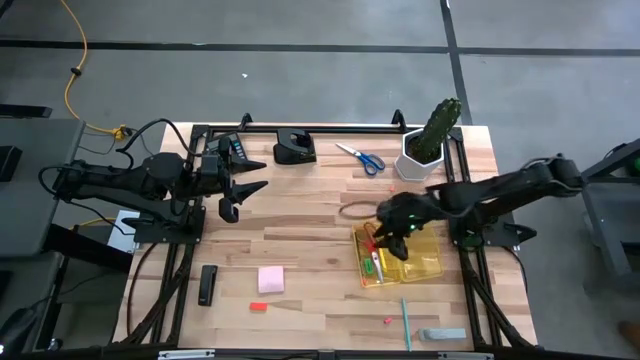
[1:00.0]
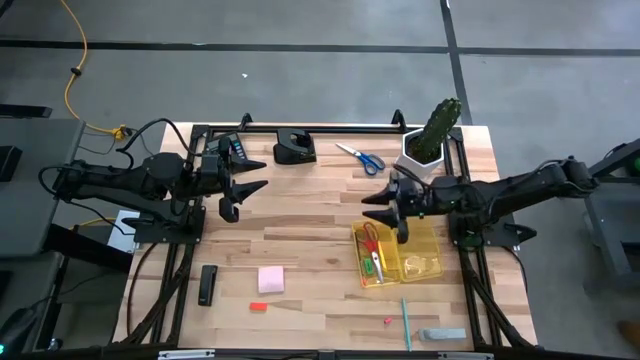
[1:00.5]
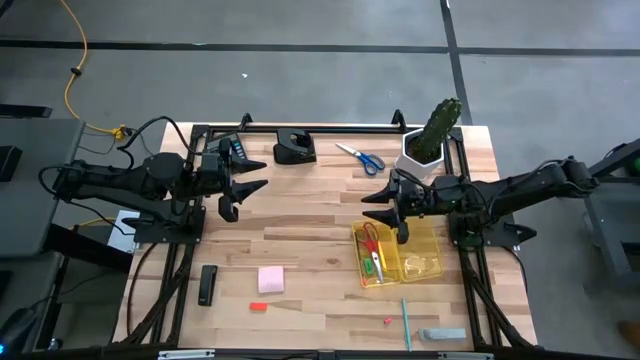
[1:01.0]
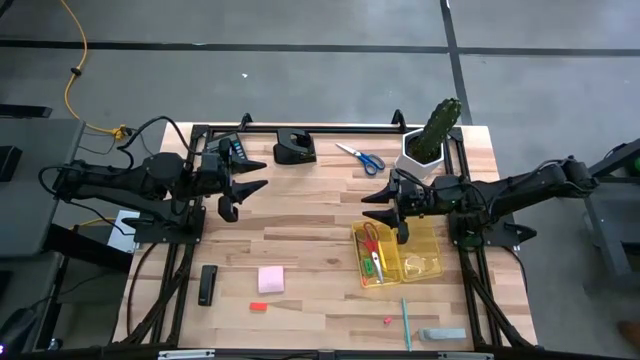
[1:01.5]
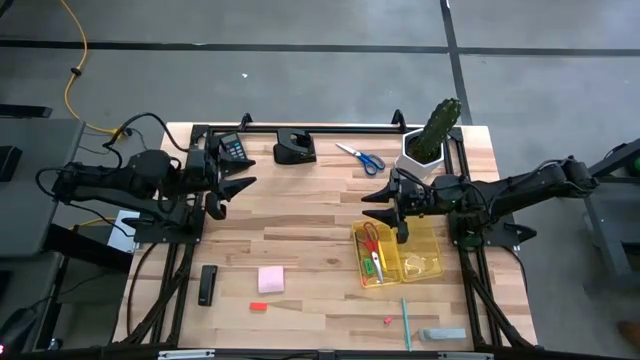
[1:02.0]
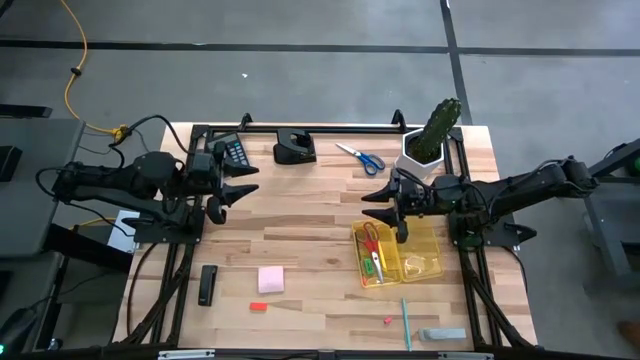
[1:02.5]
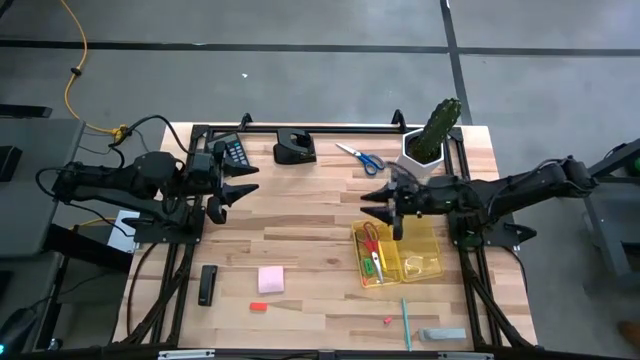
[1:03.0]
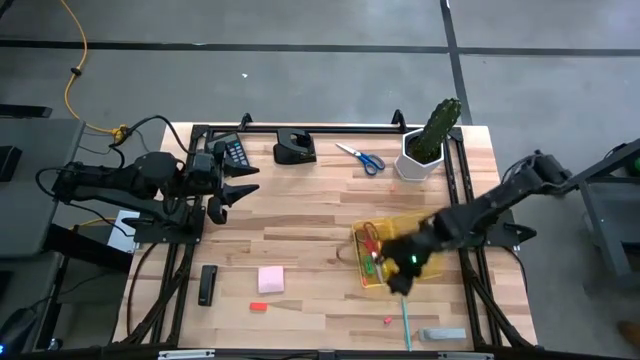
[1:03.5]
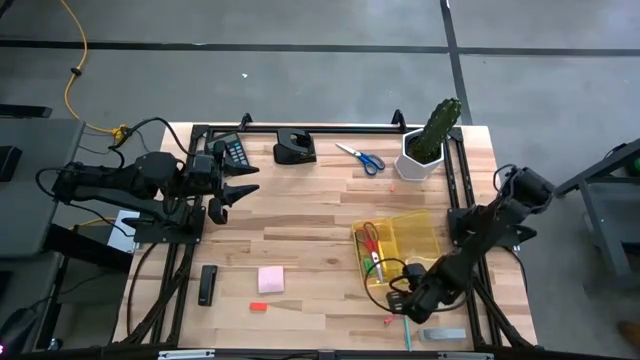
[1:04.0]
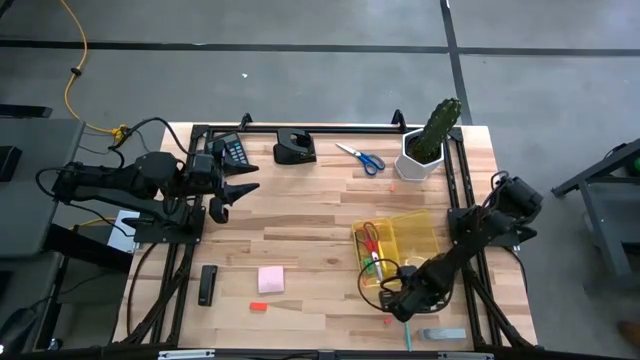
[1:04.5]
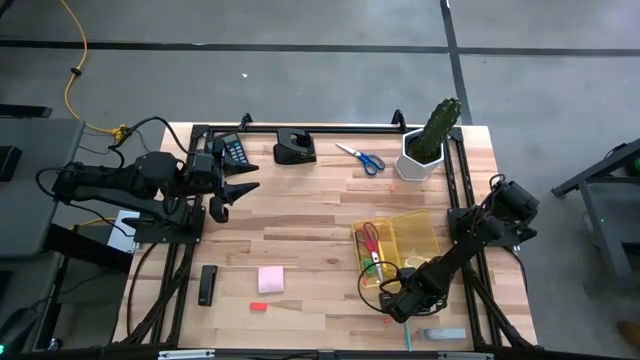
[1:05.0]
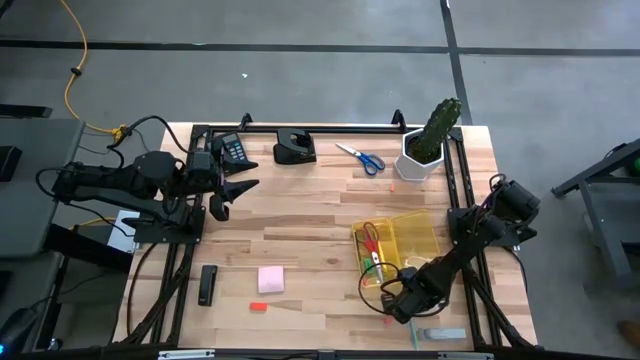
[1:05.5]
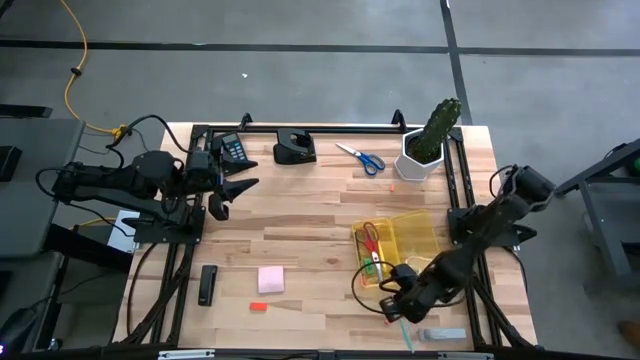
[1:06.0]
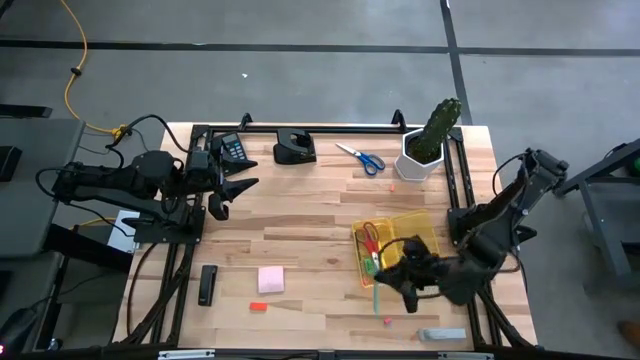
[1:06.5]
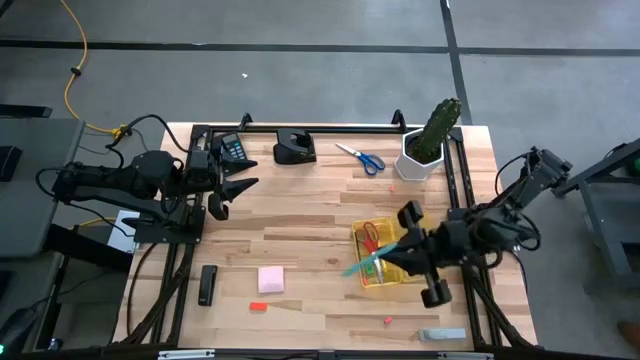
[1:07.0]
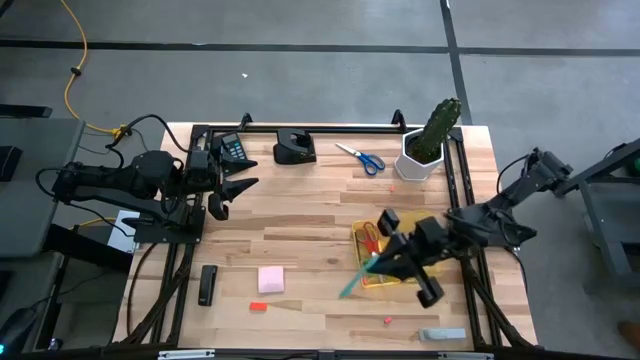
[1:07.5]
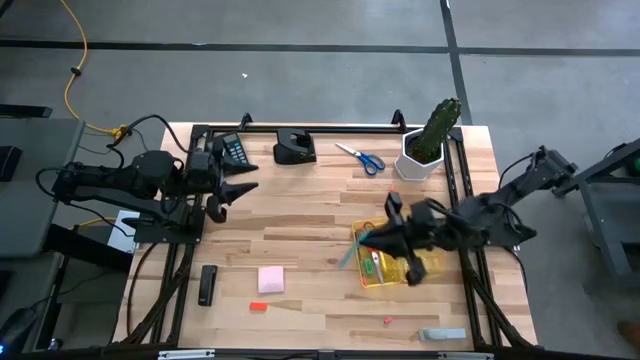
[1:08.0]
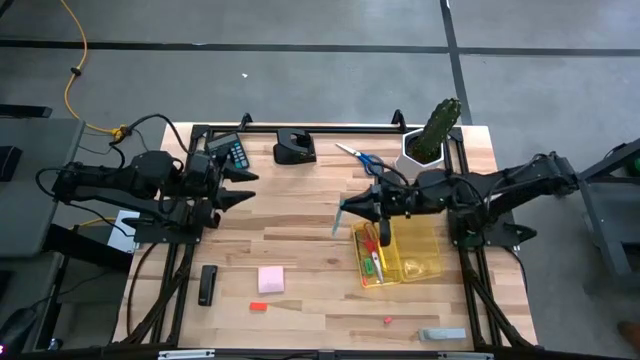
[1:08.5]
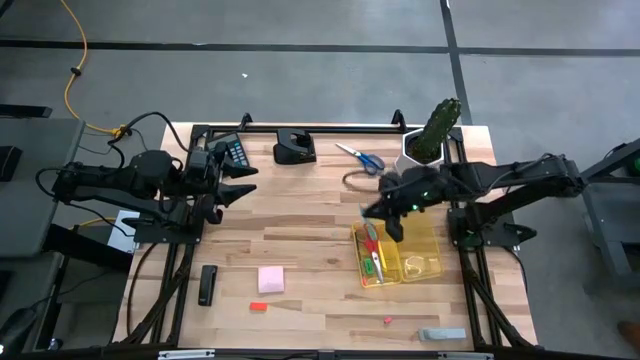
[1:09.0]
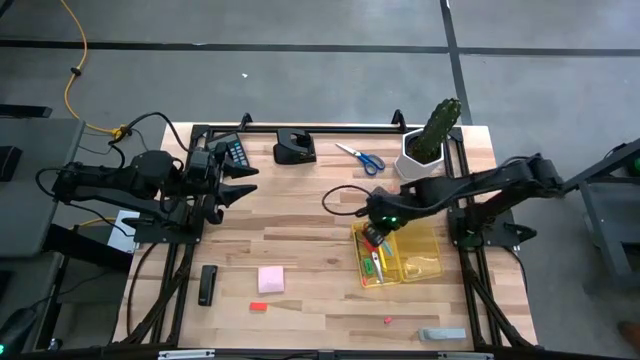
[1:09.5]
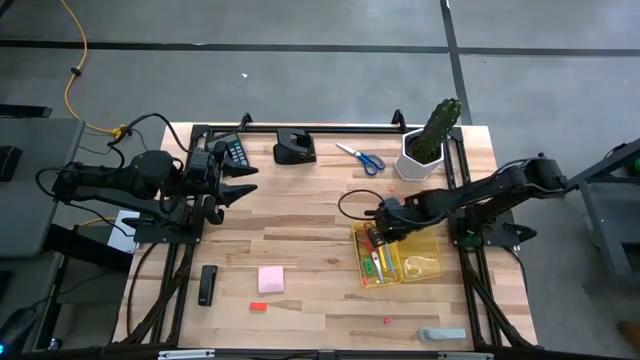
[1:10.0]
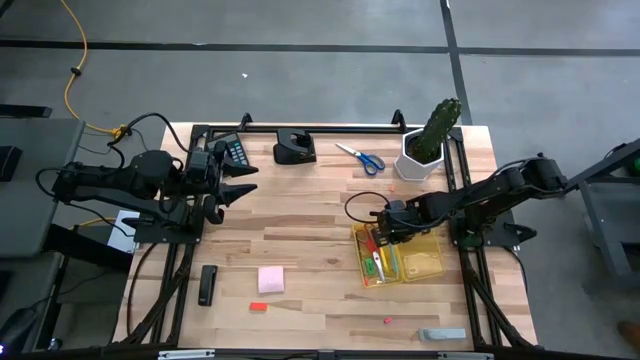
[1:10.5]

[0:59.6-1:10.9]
Task: Pack school essentials
Put the light blue pen into the yellow box

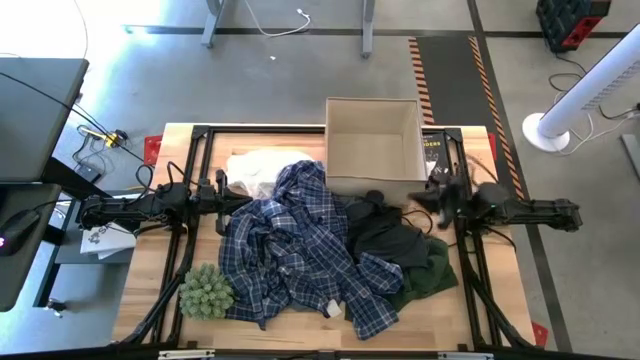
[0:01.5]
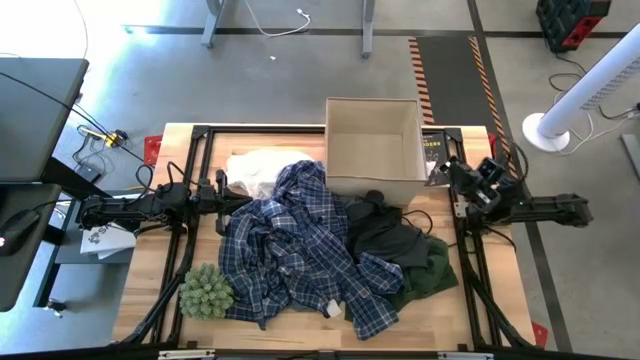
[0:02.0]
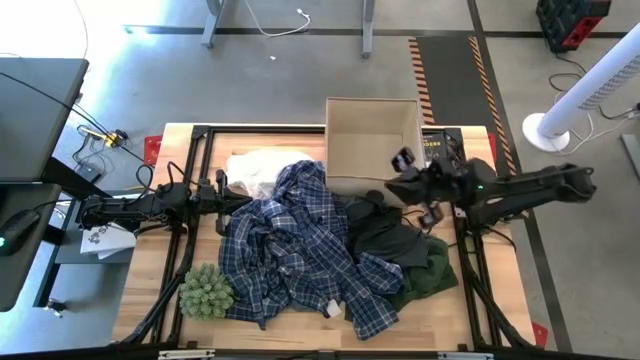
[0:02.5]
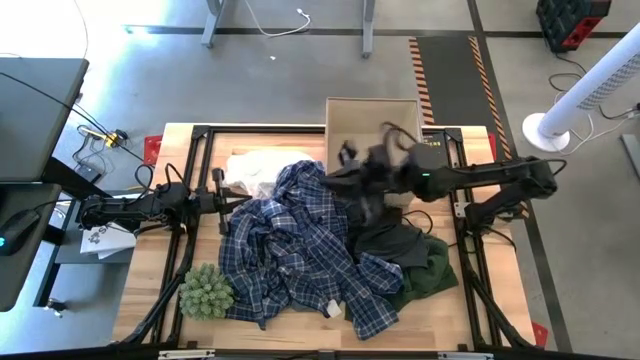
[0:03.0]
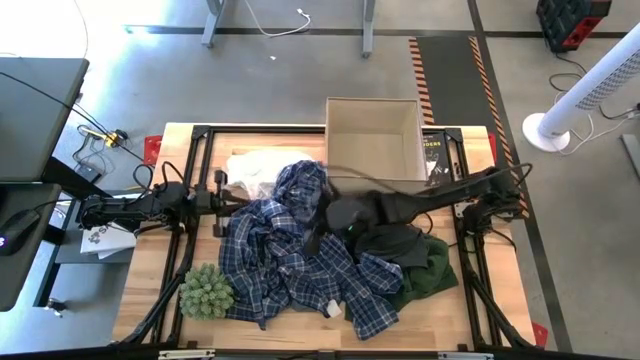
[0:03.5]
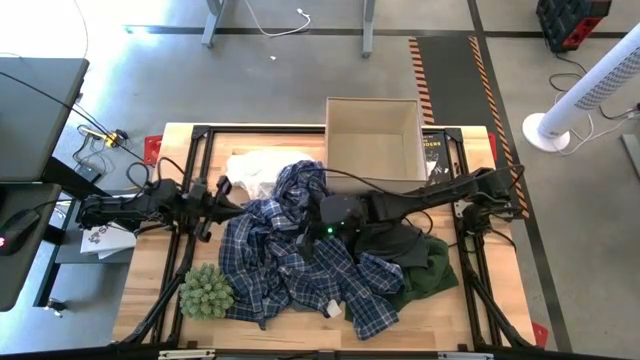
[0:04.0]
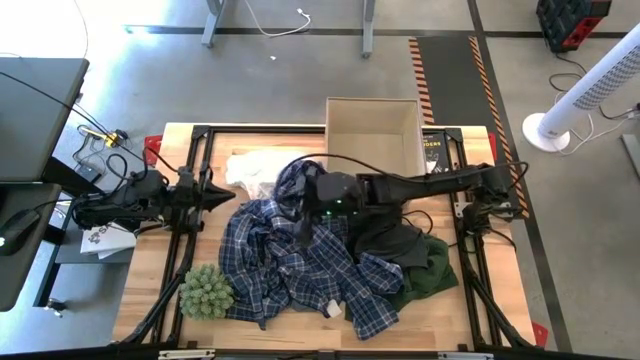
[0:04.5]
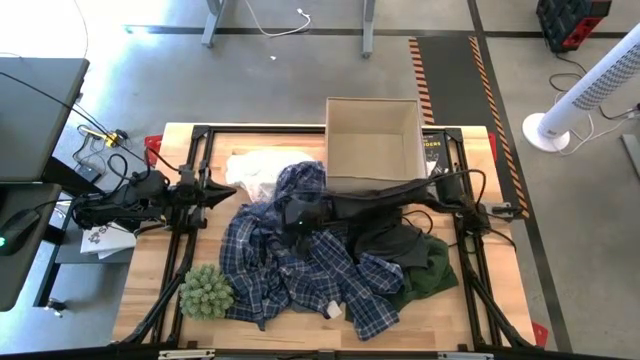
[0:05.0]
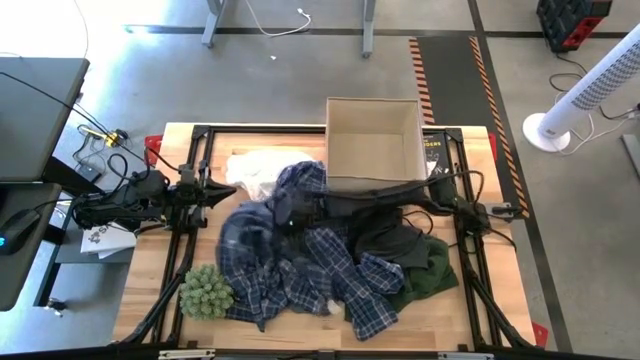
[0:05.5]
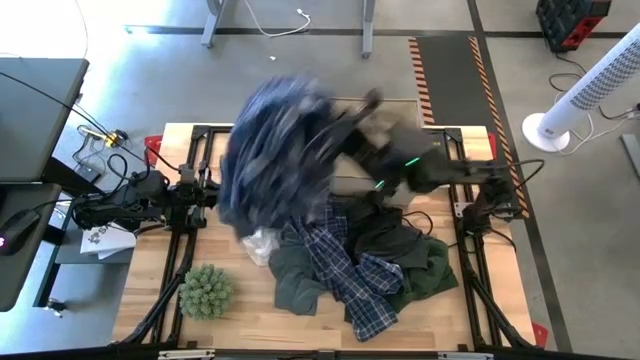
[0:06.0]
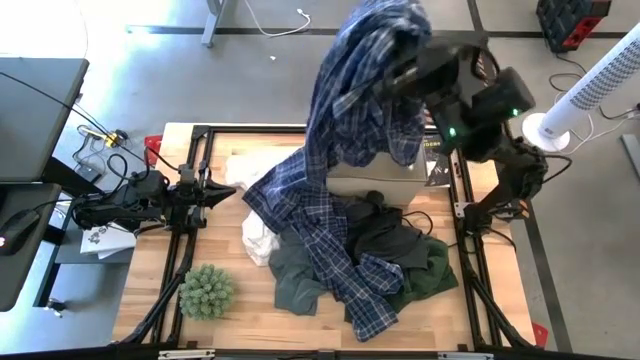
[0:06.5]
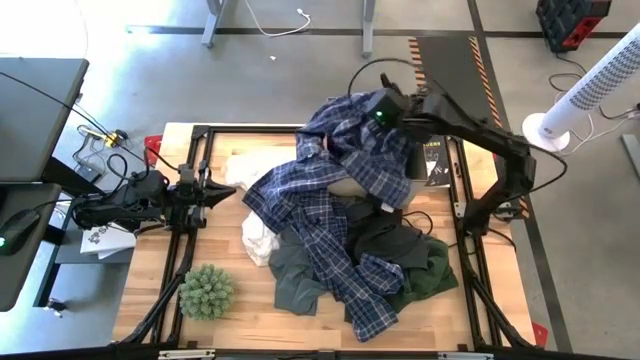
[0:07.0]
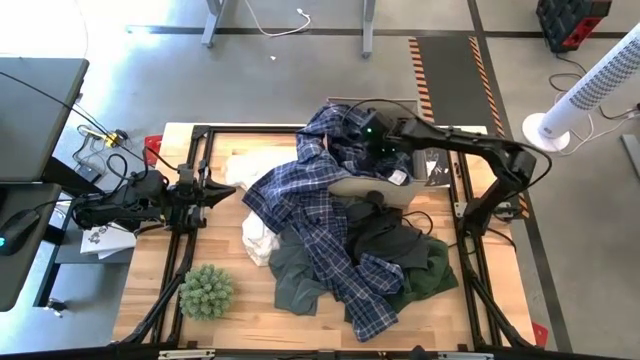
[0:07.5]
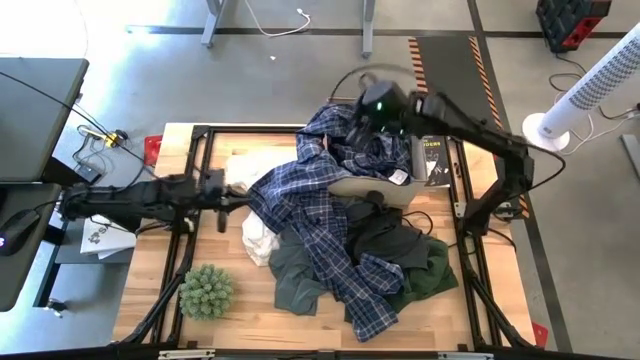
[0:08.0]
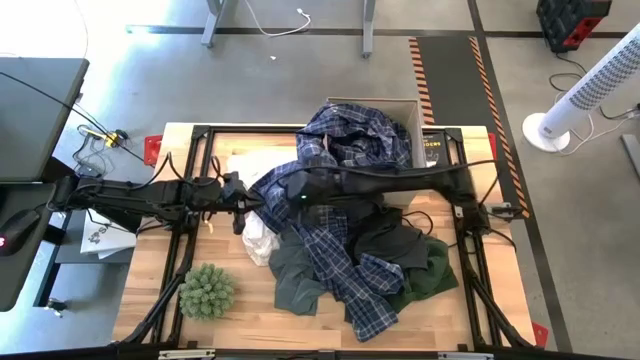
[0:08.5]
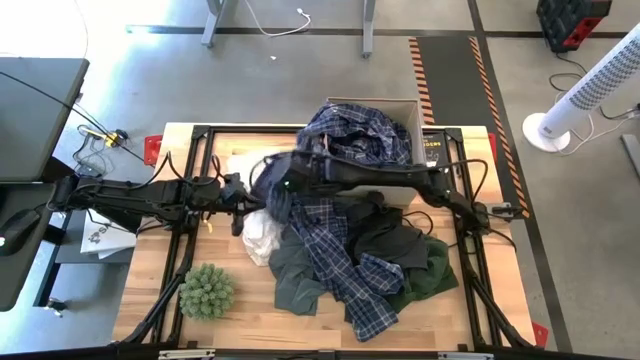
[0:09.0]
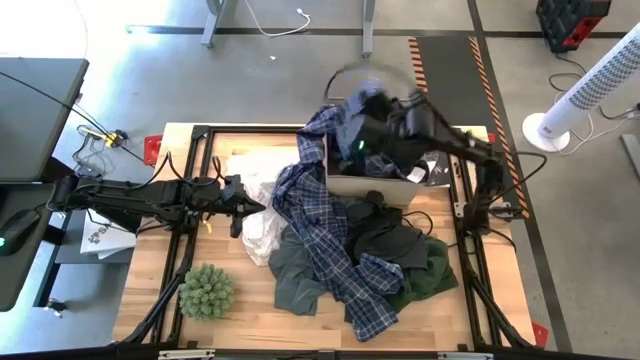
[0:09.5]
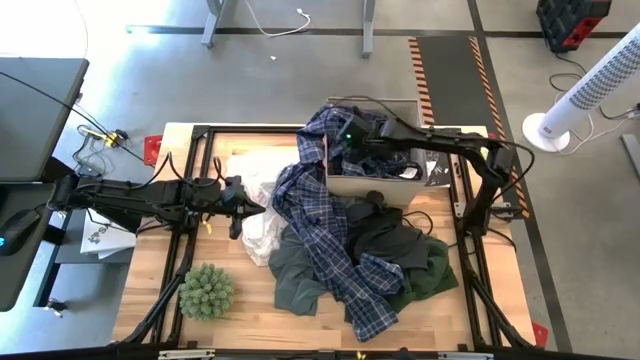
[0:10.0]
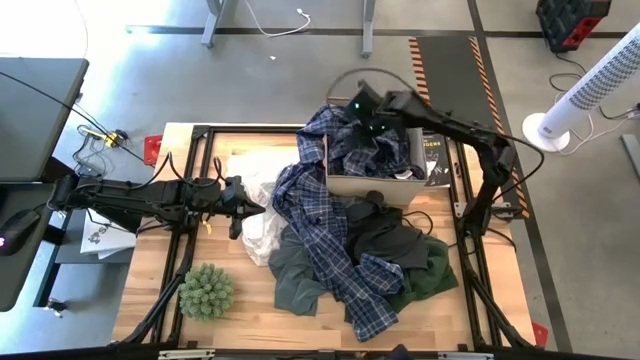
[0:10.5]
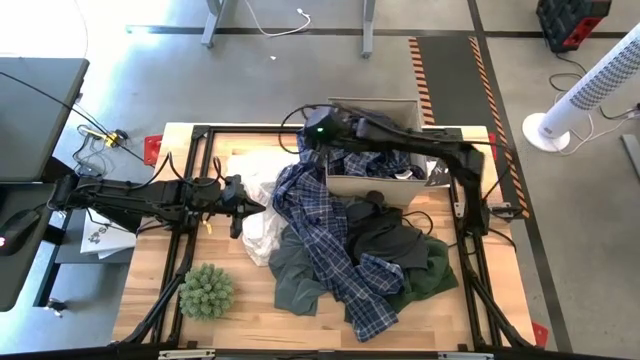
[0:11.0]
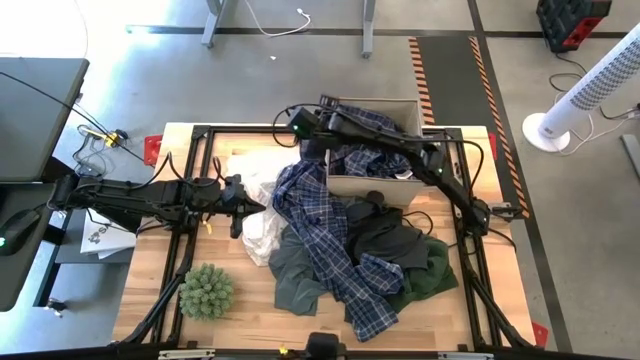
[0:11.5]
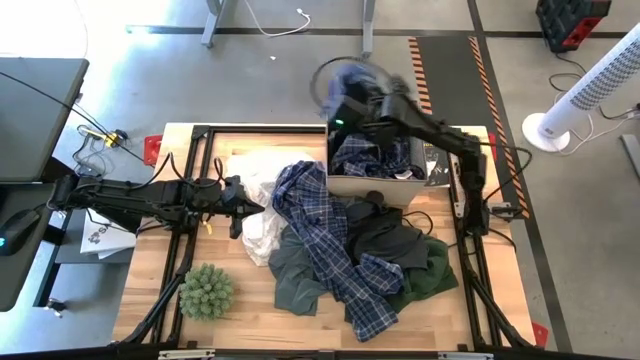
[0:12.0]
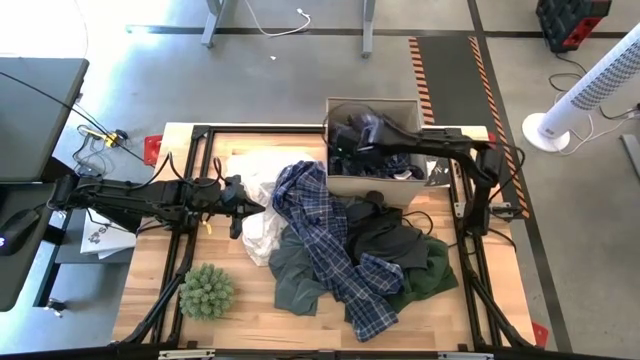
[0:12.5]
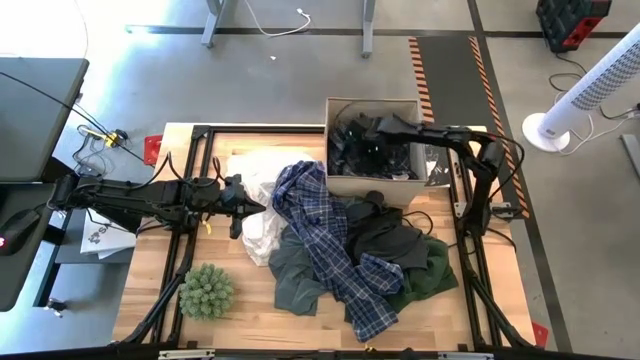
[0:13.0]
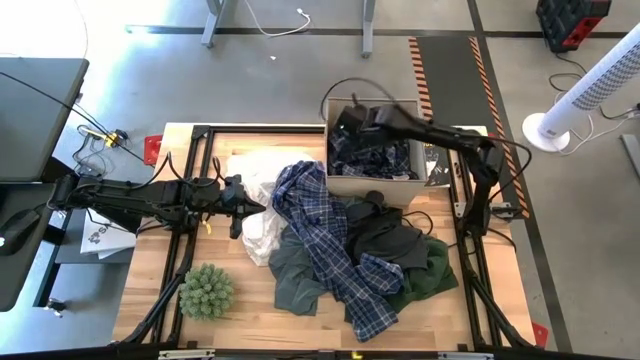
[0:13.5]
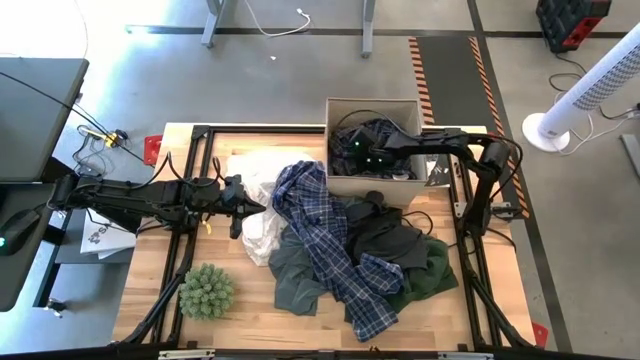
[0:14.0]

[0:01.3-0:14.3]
Task: Sort clothes
Put the blue striped long-sleeve shirt into the laundry bin
